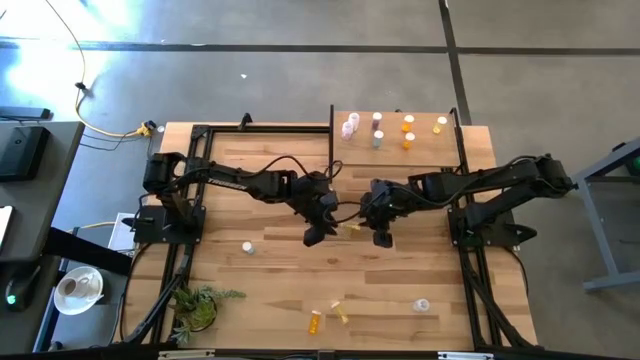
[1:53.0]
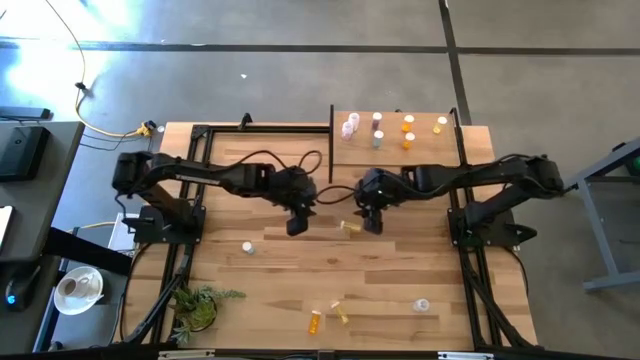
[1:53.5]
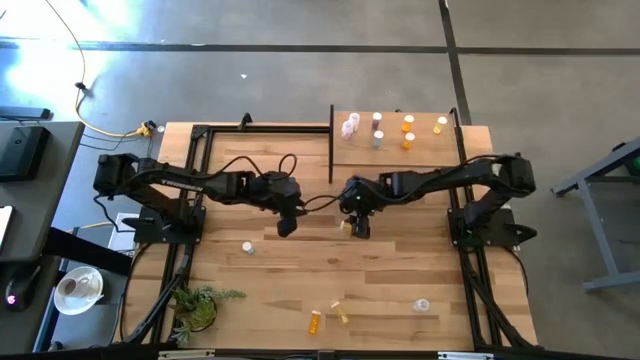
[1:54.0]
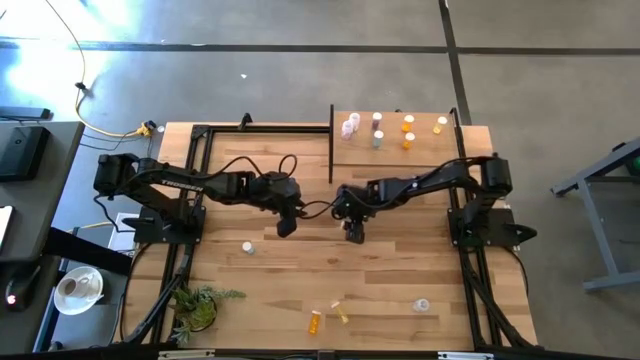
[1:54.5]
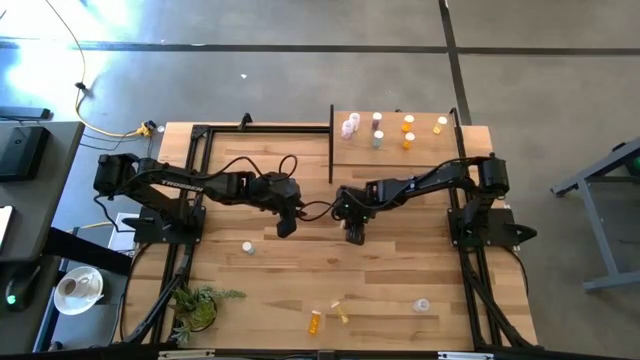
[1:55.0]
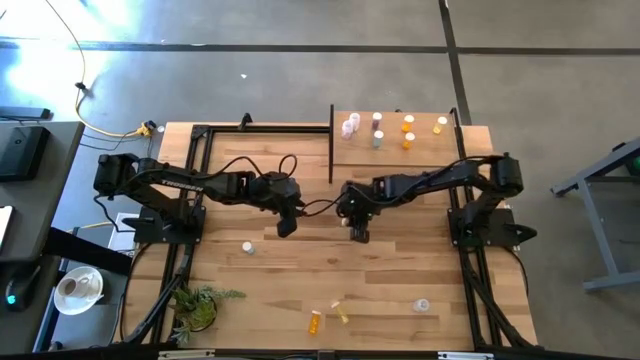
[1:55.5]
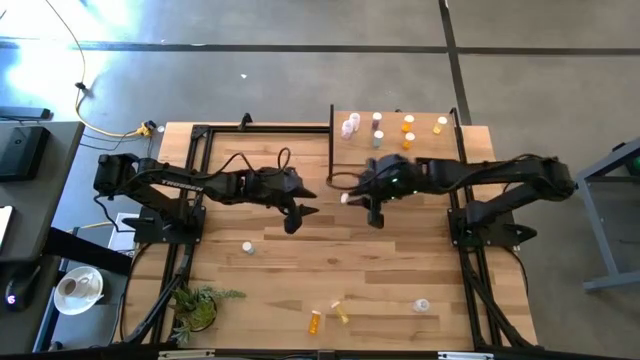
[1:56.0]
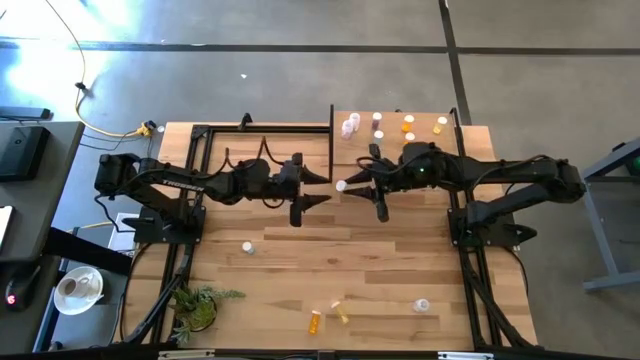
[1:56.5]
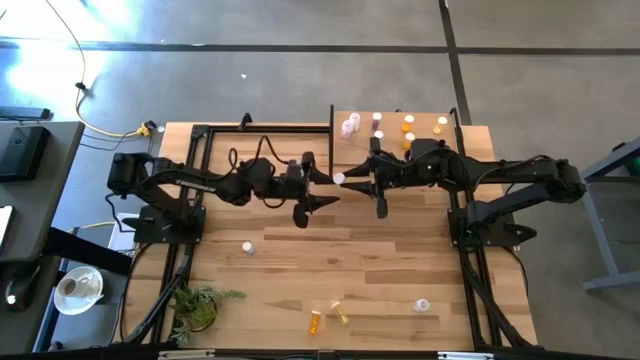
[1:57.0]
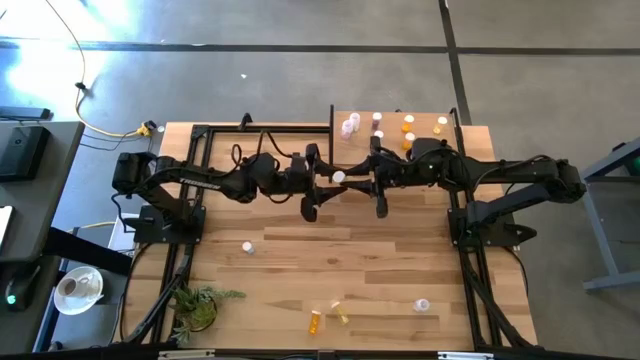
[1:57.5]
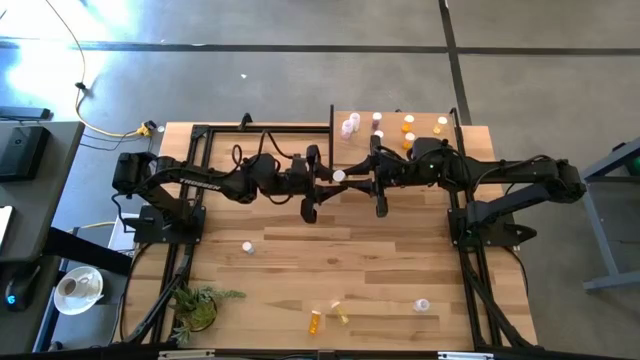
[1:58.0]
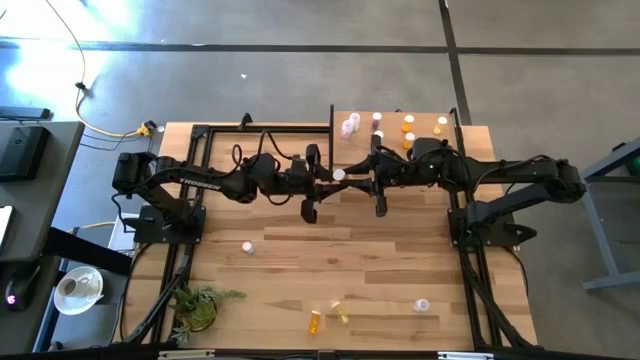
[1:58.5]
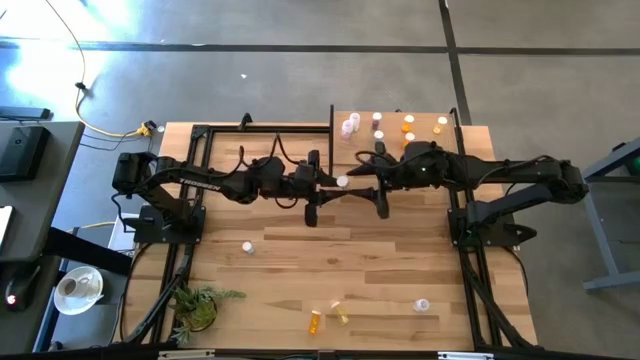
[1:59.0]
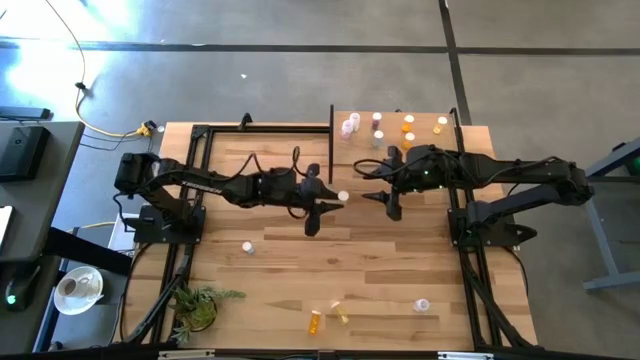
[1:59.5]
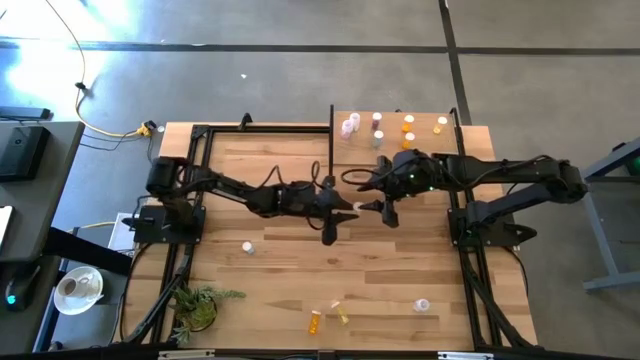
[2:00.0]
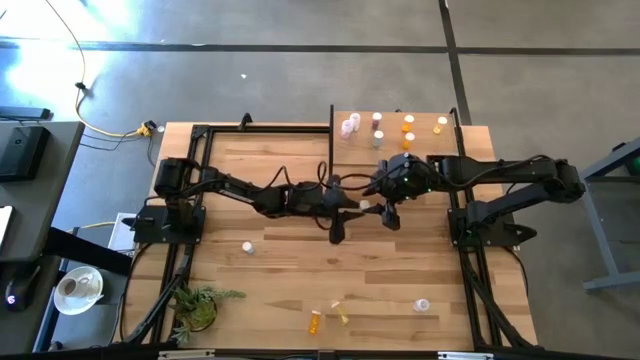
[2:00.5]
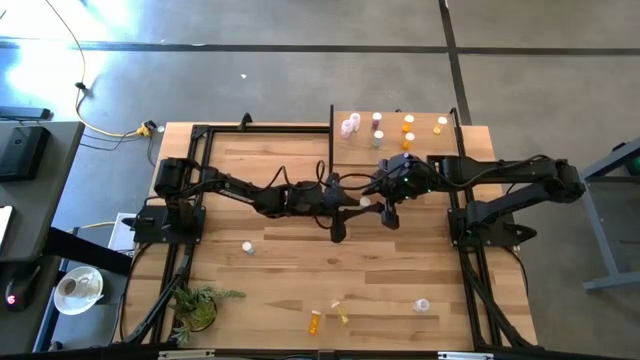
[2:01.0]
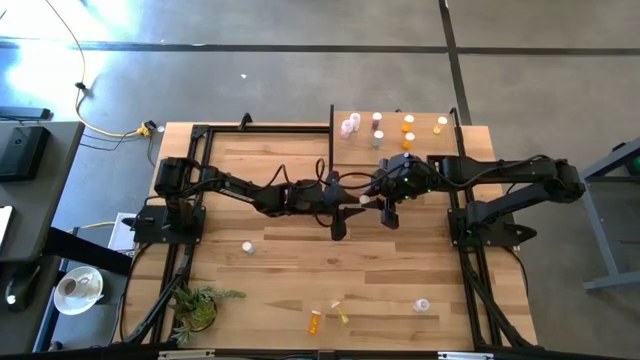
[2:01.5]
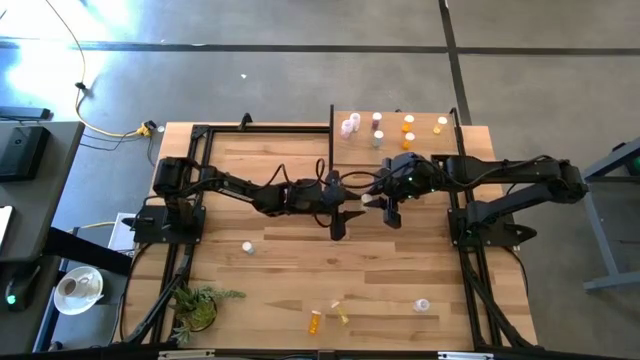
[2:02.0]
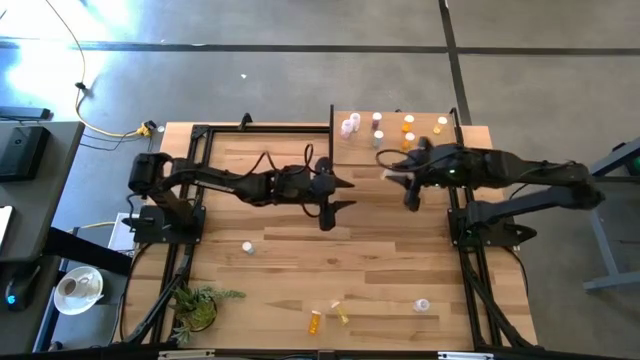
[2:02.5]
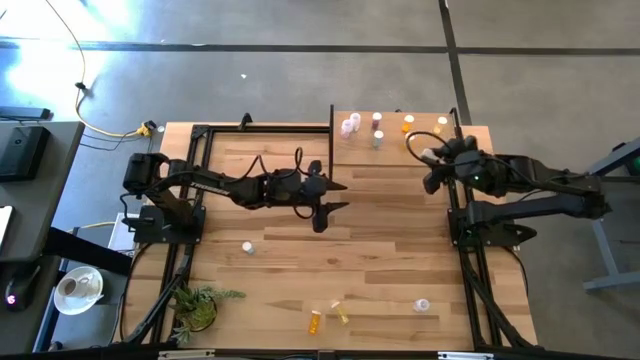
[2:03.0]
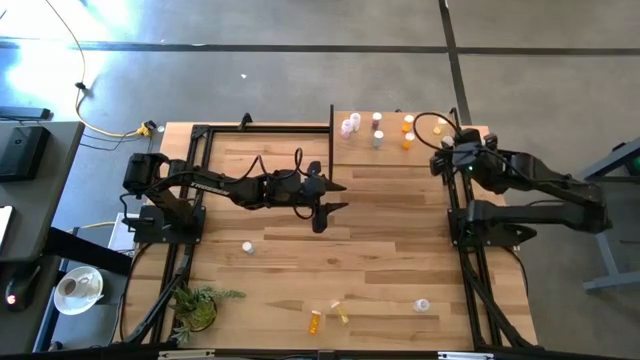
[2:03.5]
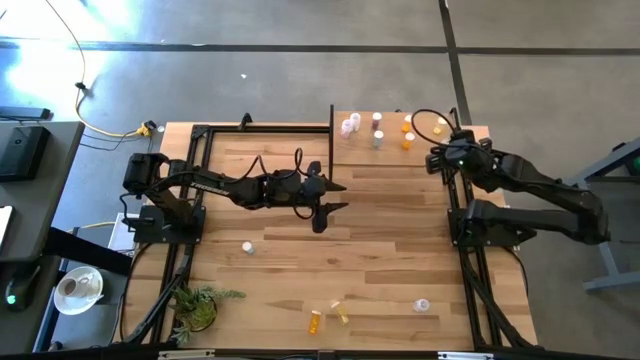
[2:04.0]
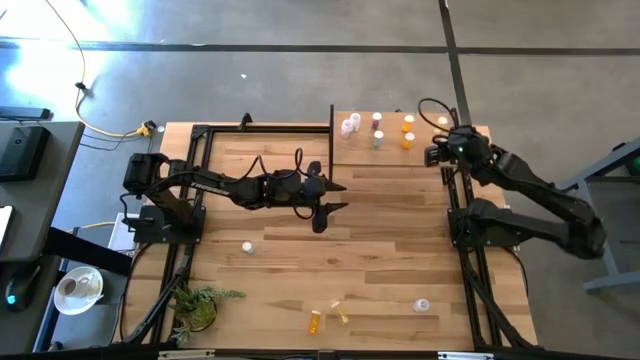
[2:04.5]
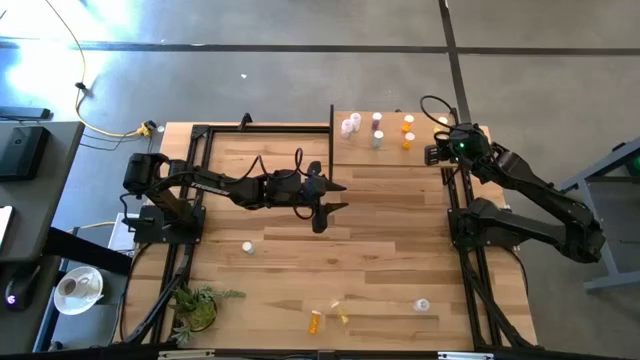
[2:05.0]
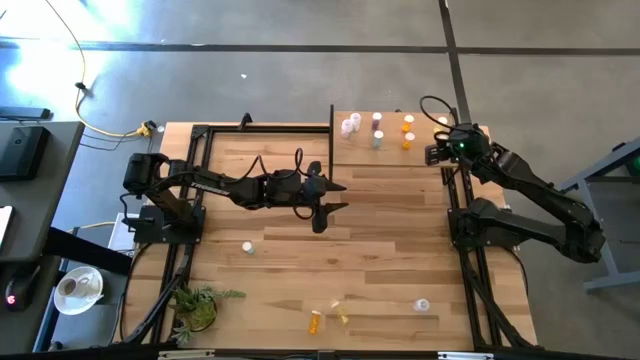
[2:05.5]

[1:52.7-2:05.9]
Task: Pick and place medicine bottles onto shelf by color
Put the top yellow pill bottle on the shelf aligned with the other yellow pill bottle

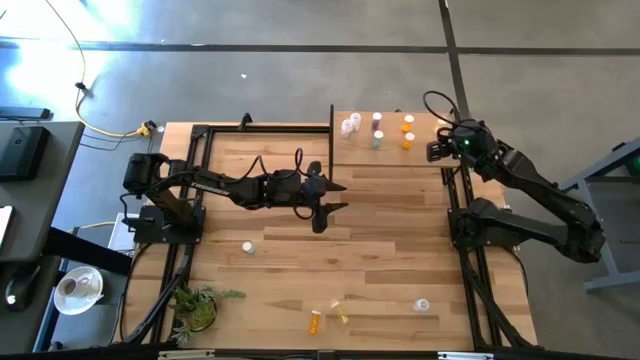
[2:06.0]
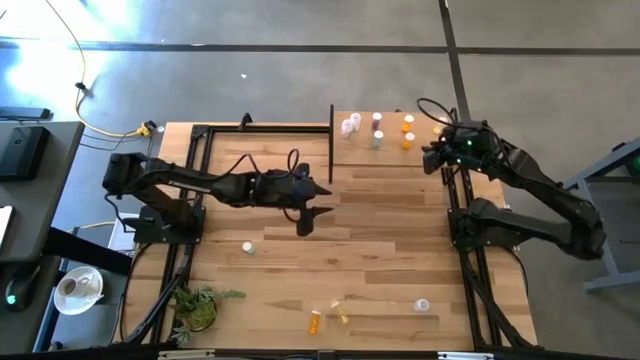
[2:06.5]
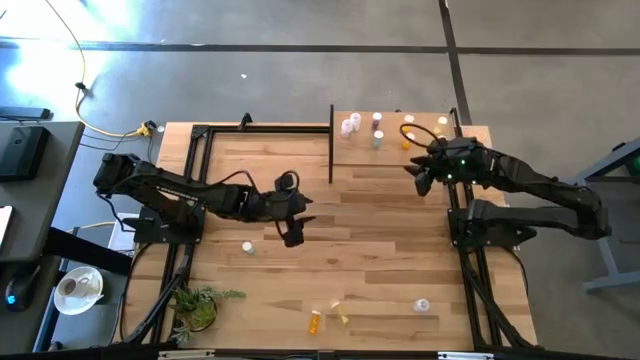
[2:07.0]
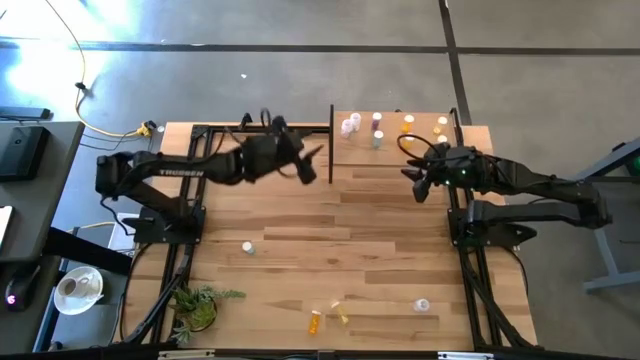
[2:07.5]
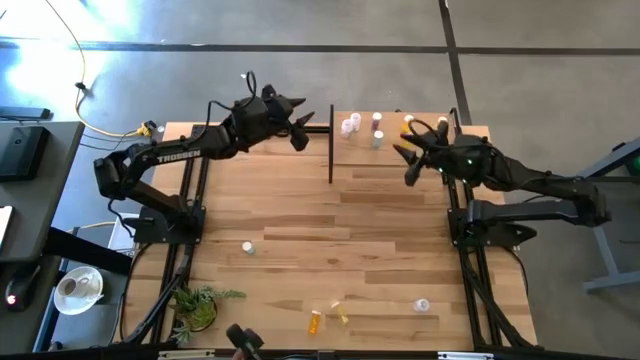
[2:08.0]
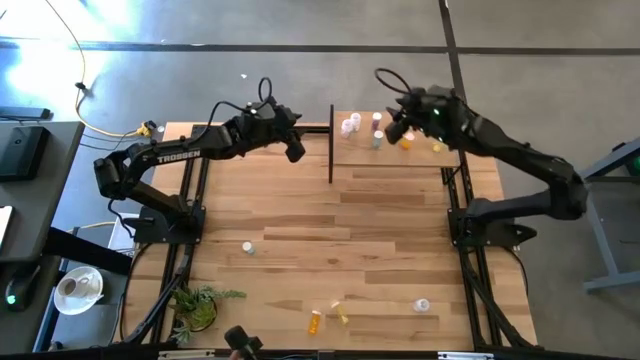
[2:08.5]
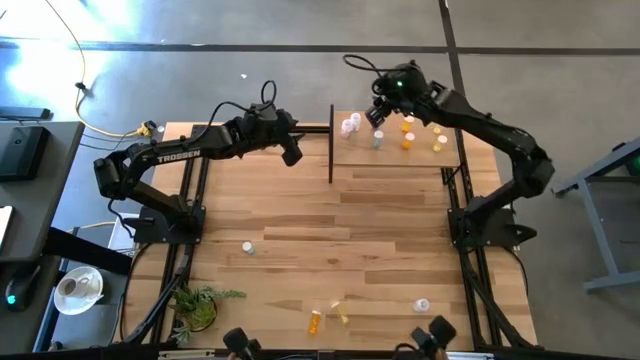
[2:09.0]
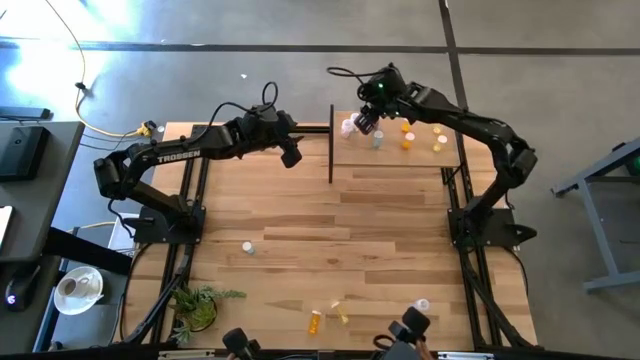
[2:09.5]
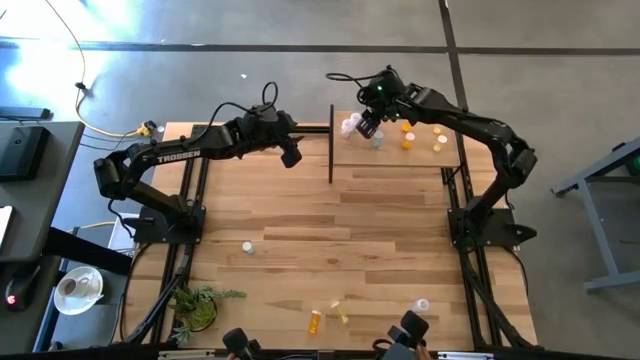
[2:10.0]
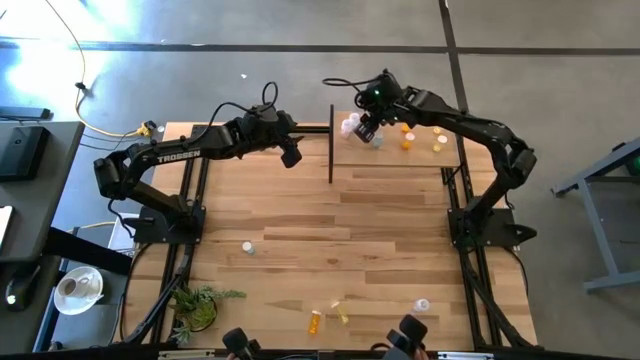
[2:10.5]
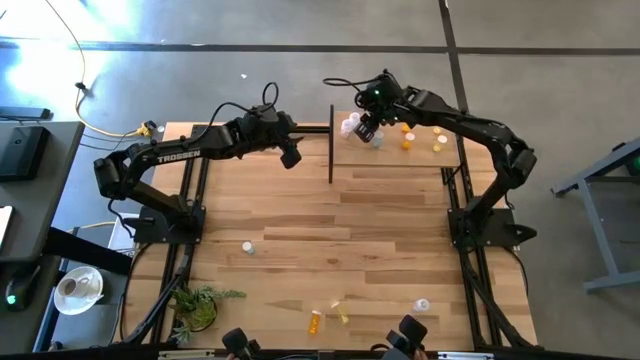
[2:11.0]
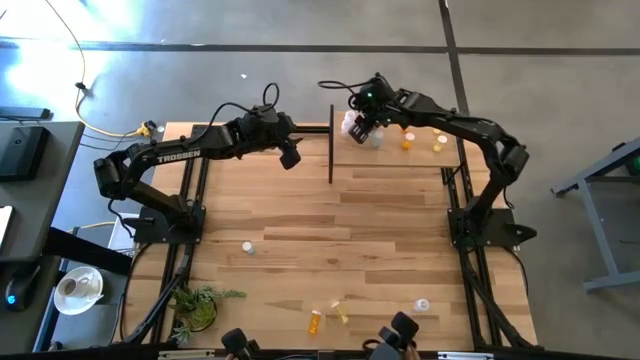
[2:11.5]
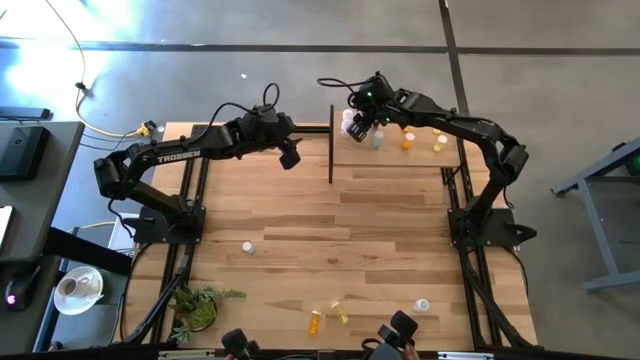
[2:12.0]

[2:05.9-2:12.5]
Adjust the top transparent pill bottle on the shelf

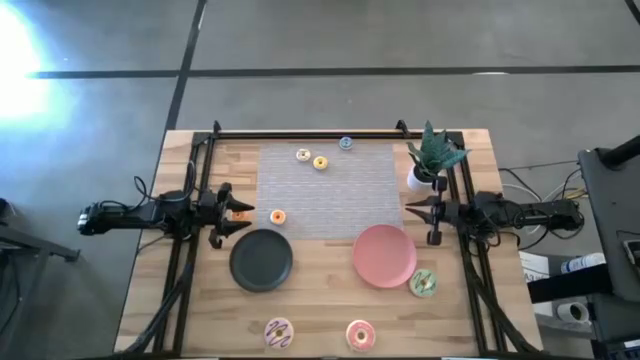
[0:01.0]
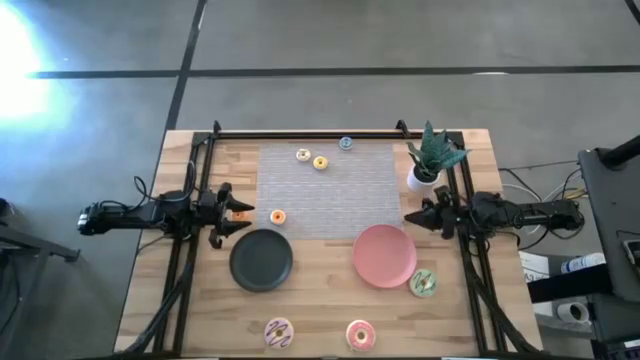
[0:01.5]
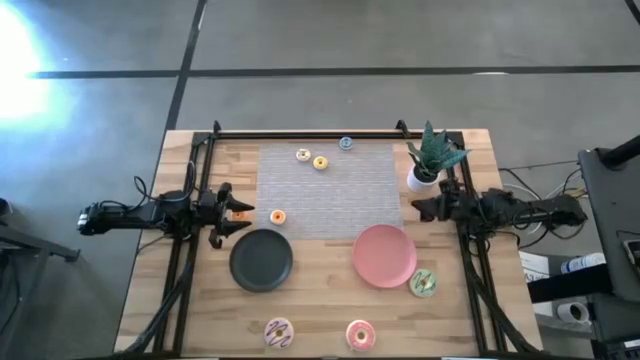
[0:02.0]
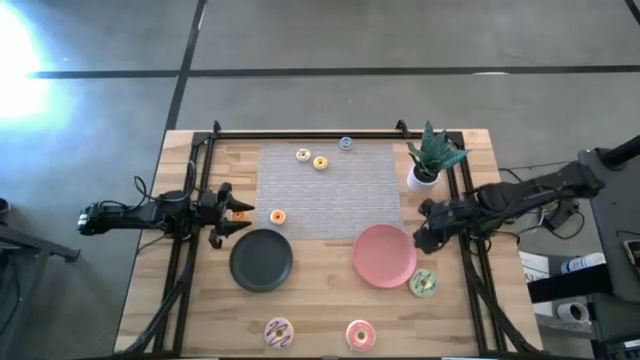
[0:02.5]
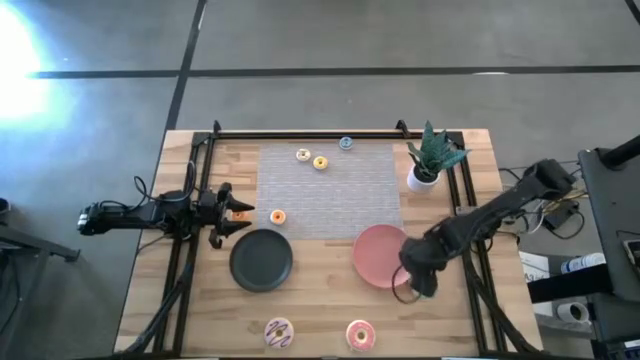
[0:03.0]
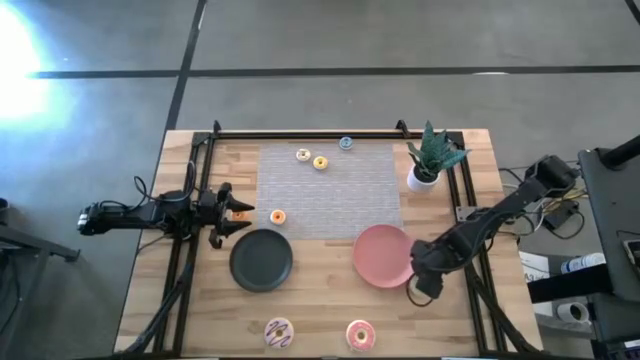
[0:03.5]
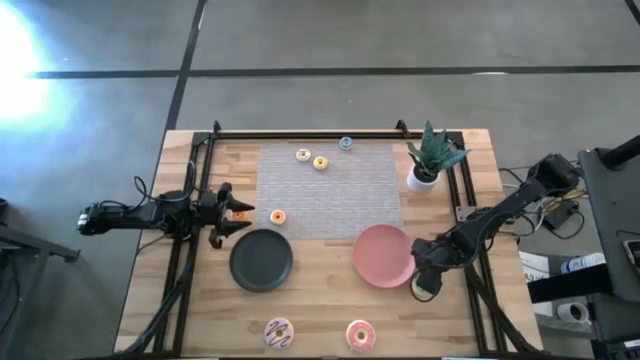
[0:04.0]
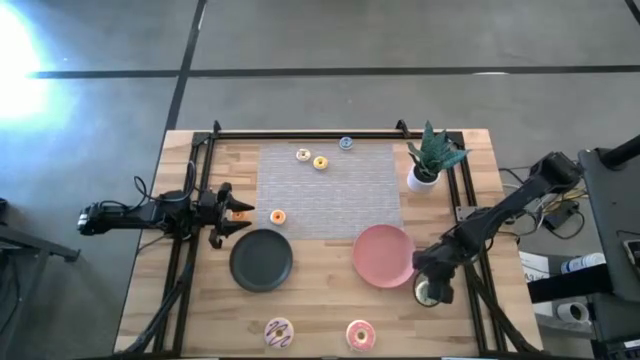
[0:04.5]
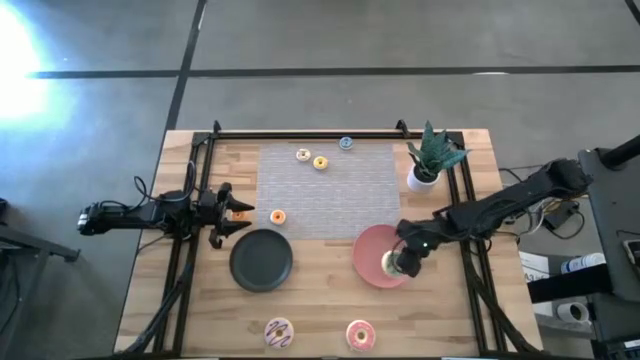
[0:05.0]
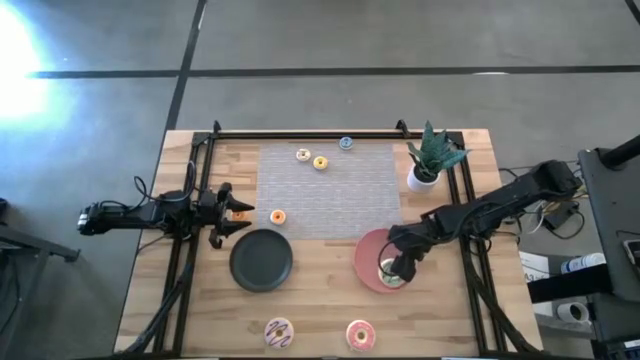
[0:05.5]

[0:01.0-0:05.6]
Task: Pick & Place donuts
Put the large light blue donut on the pink plate
